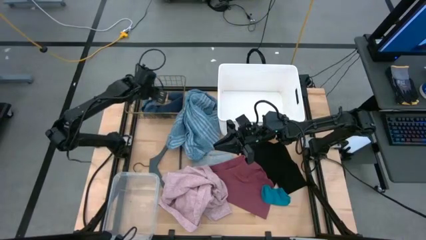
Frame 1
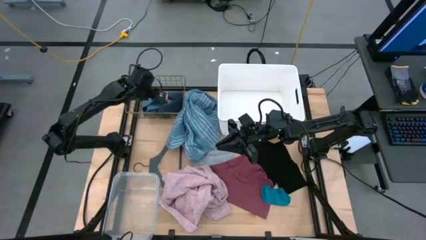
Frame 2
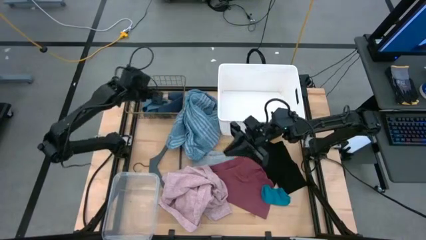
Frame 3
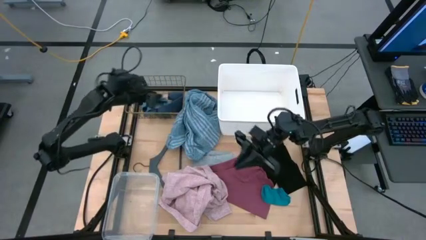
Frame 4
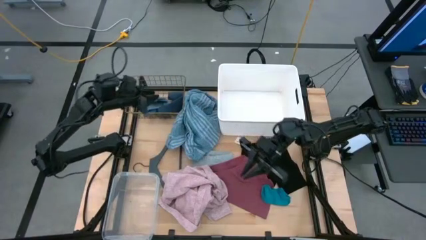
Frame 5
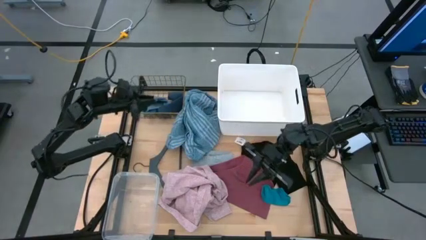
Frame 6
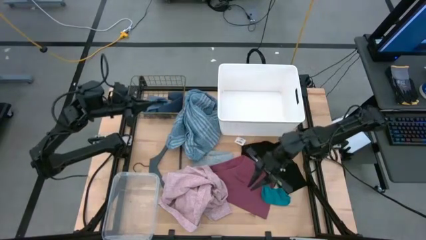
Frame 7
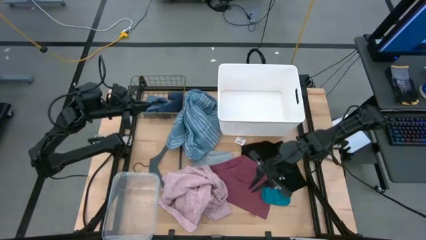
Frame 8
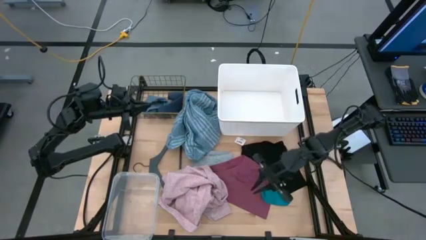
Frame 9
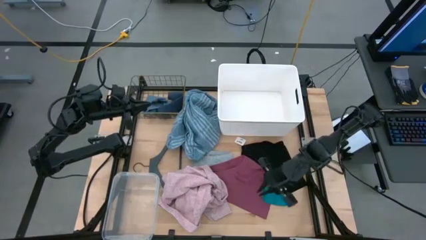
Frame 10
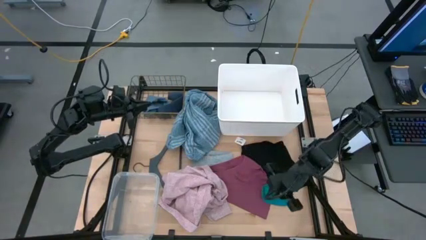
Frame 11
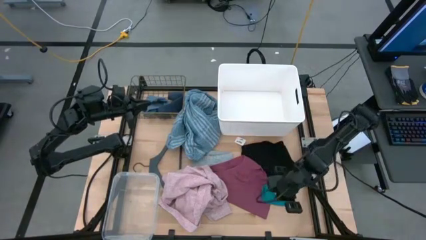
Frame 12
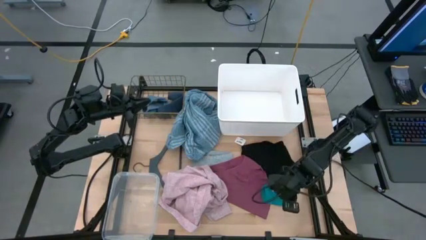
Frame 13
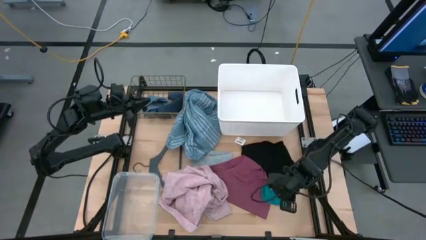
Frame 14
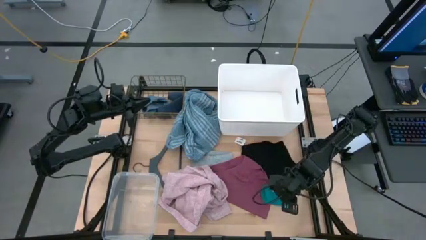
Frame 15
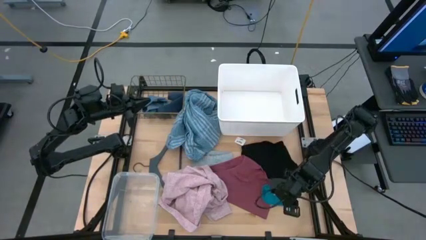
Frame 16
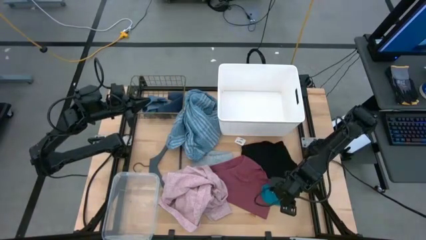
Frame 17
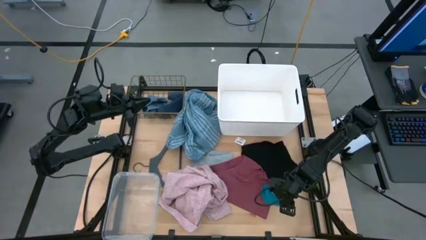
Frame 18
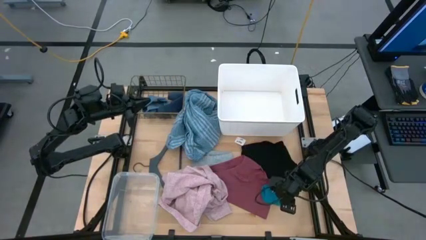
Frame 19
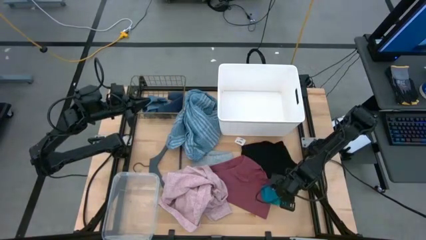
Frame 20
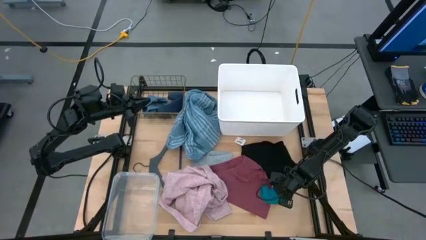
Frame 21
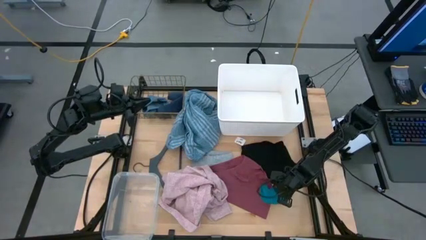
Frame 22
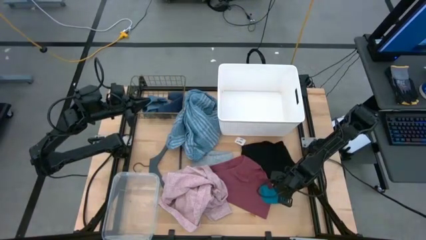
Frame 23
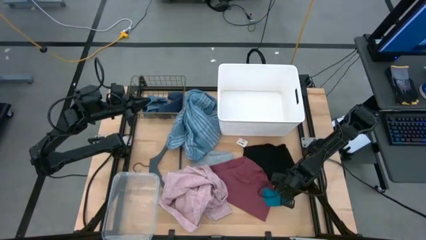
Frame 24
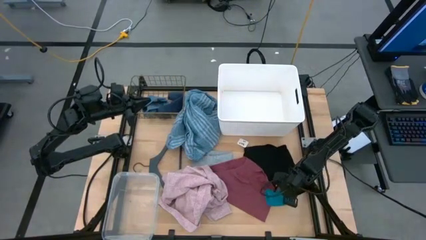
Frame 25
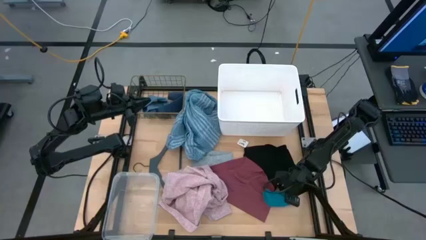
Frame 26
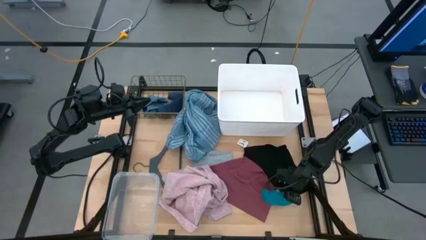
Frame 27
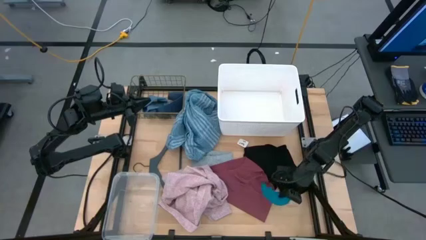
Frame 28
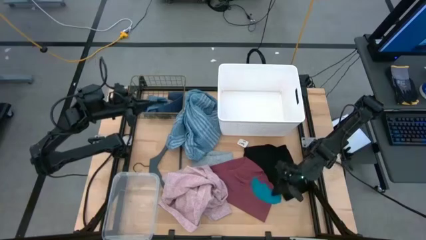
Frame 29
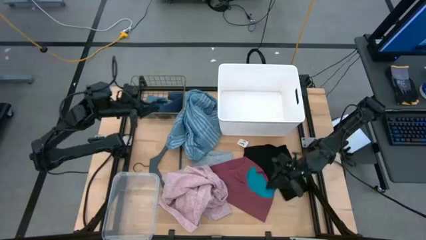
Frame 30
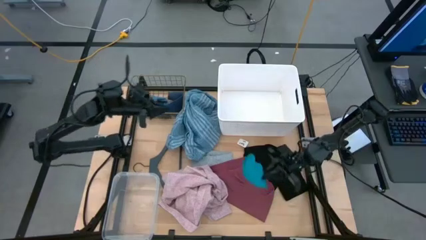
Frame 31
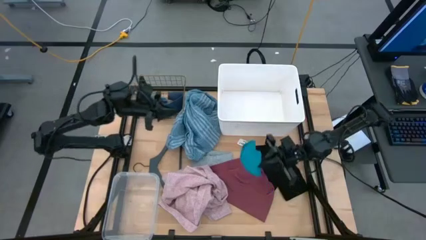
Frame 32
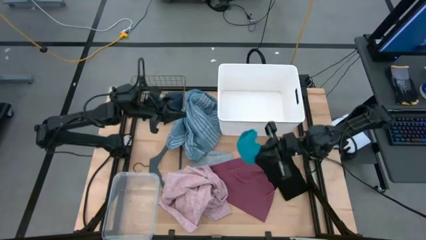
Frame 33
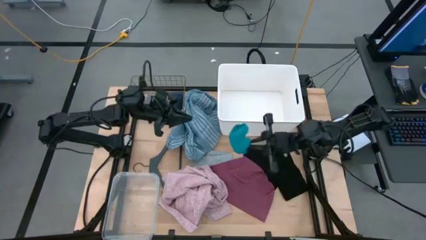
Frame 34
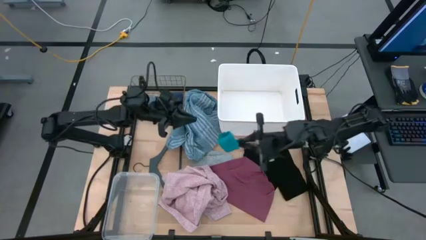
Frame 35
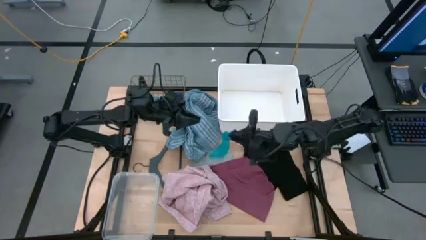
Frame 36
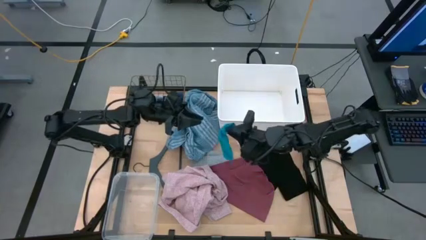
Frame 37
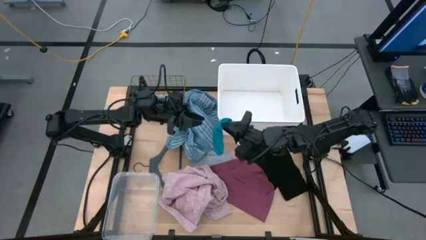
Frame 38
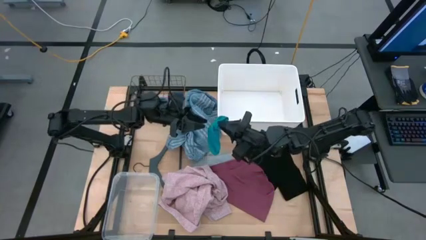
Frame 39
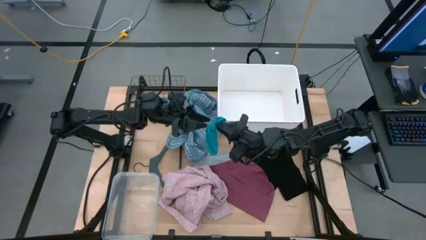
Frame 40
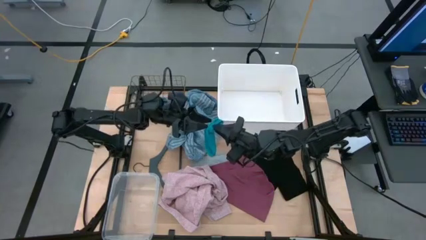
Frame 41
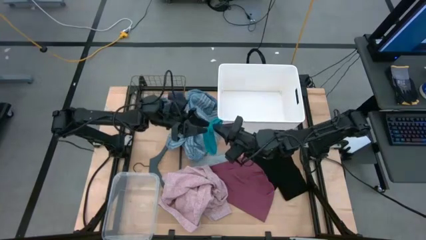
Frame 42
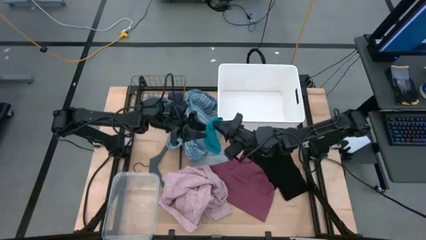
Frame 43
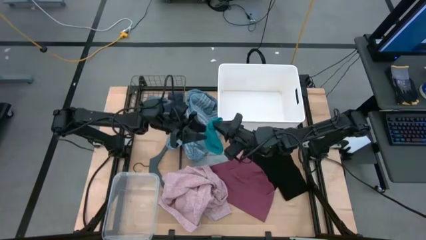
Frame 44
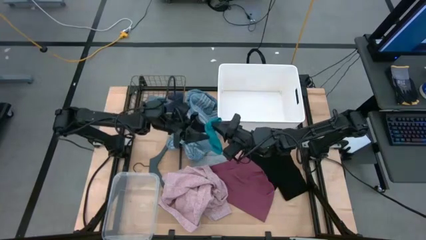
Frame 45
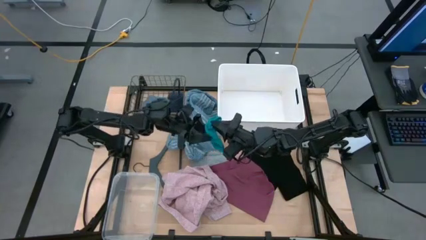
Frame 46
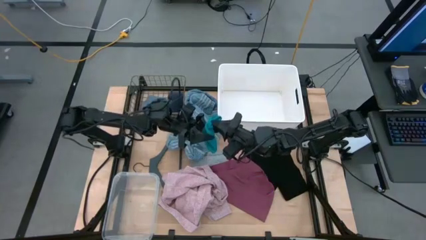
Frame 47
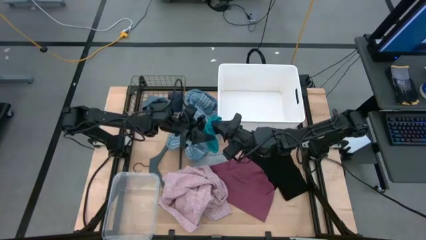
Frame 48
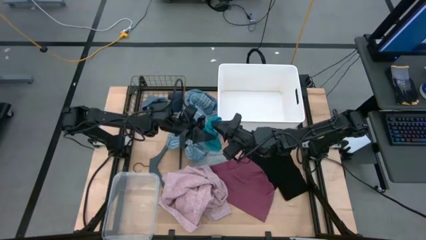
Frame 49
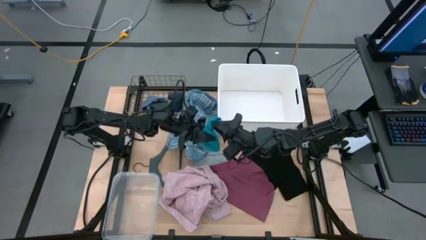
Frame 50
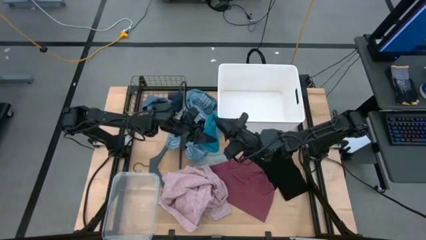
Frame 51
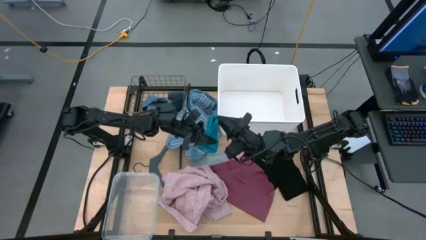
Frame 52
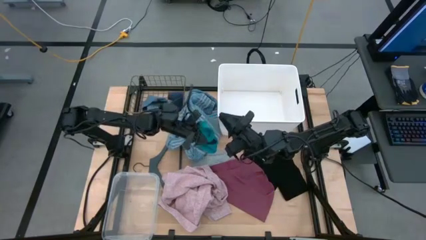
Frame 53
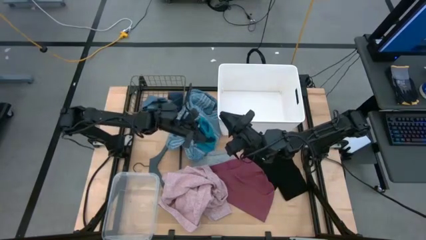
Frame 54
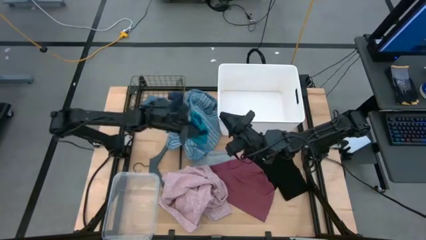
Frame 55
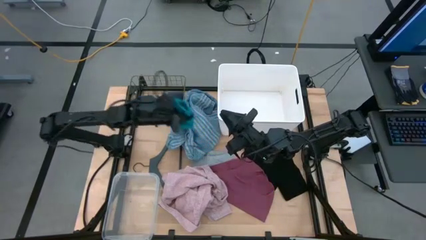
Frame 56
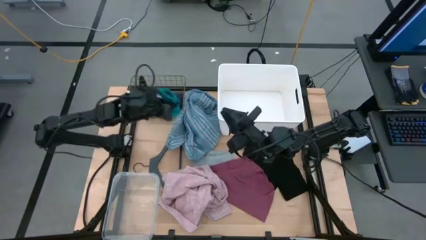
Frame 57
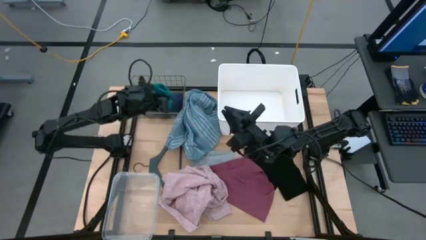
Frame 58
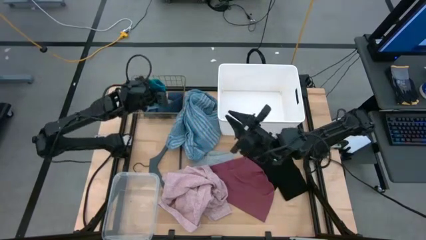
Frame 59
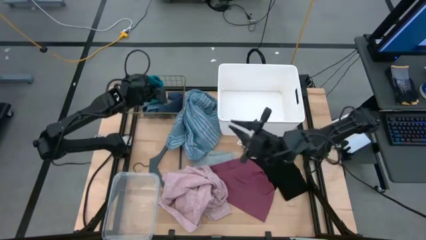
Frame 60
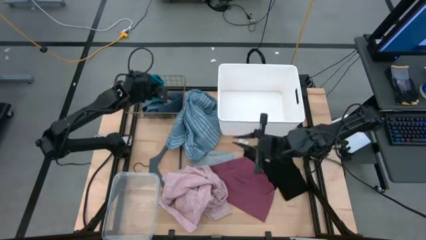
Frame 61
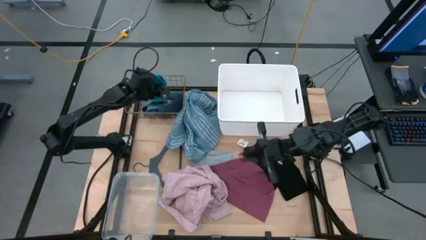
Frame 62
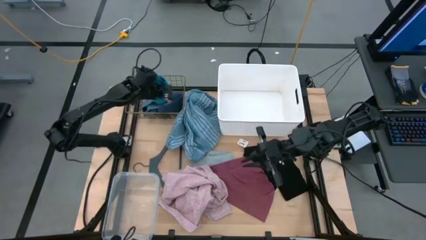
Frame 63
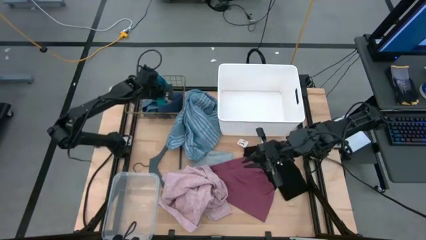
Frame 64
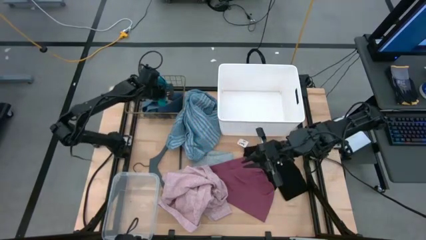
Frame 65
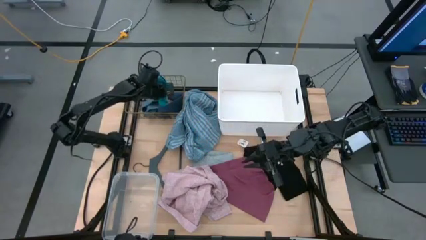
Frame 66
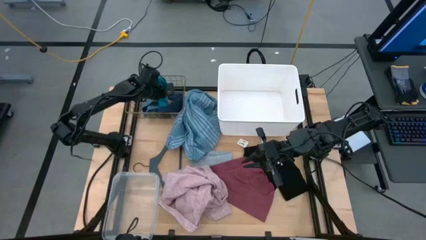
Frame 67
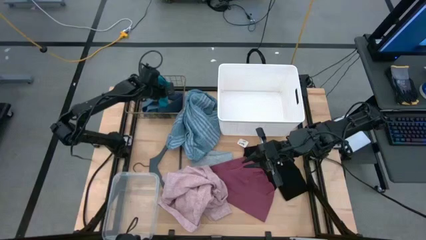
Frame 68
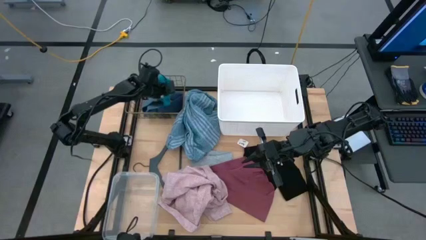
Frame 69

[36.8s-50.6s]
Task: Pick & Place Cloths
Put the light blue sock into the wire basket

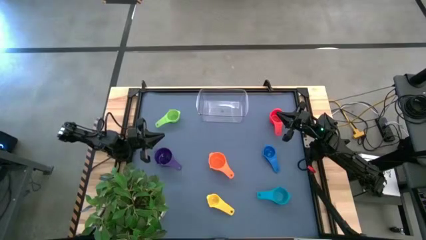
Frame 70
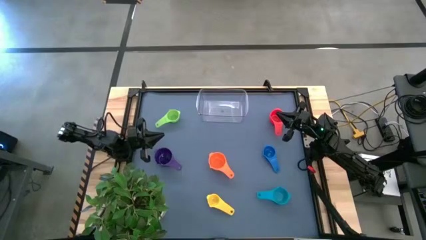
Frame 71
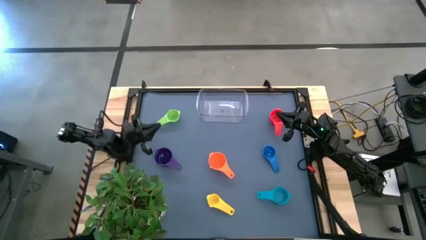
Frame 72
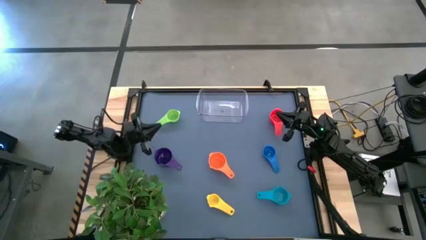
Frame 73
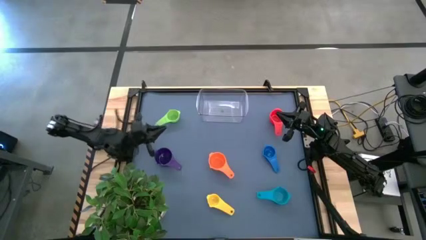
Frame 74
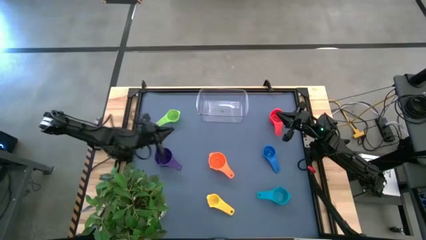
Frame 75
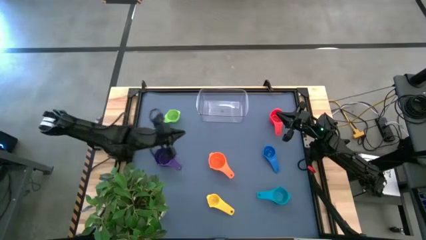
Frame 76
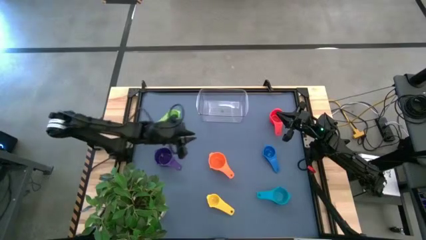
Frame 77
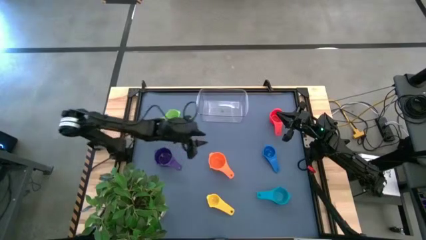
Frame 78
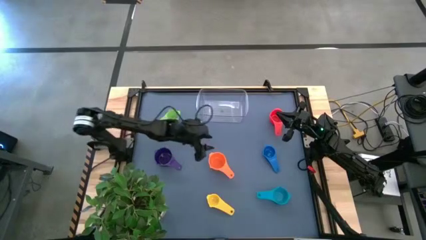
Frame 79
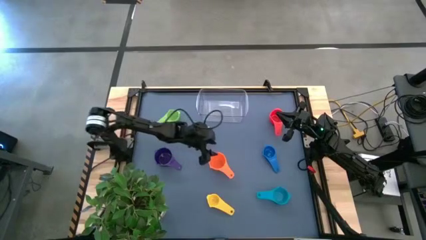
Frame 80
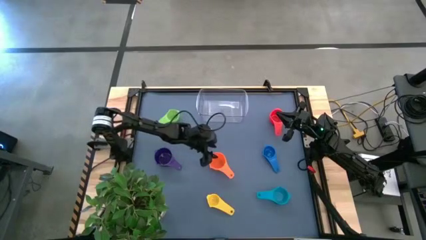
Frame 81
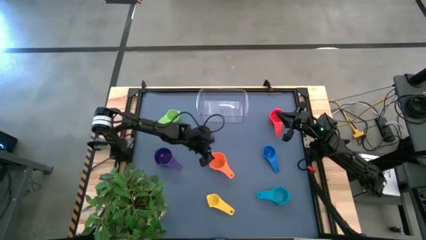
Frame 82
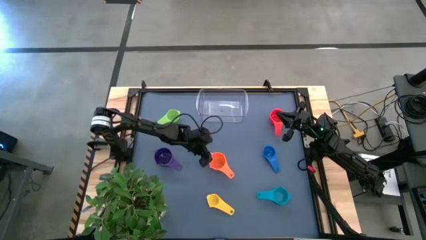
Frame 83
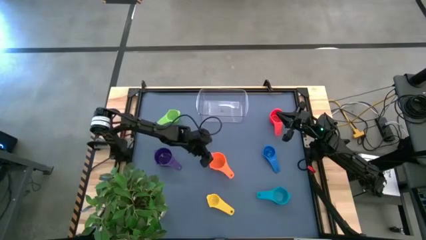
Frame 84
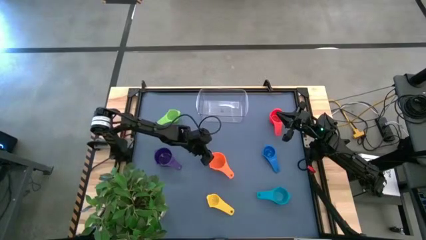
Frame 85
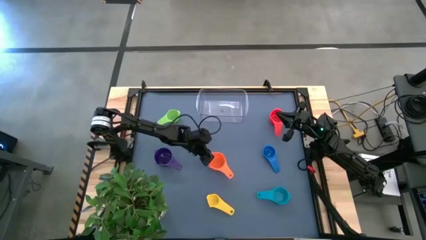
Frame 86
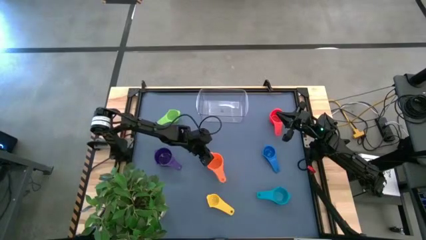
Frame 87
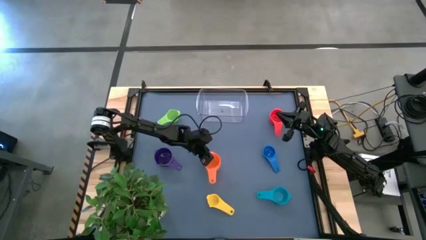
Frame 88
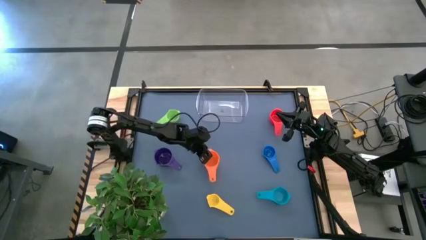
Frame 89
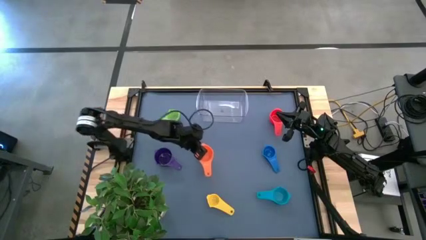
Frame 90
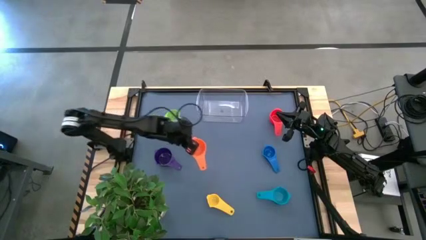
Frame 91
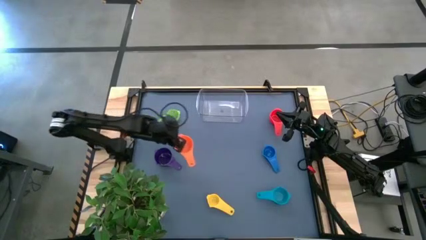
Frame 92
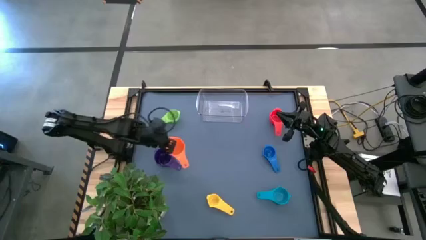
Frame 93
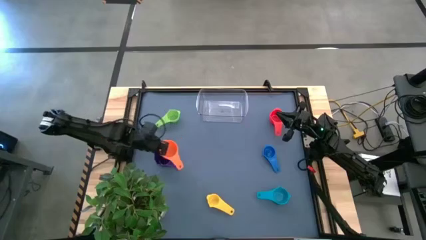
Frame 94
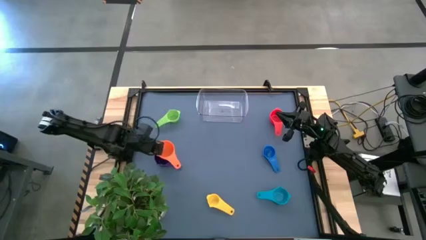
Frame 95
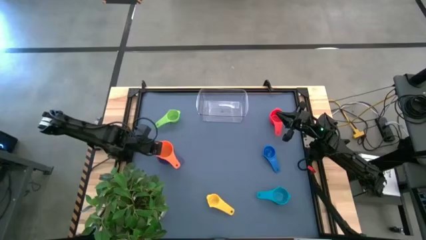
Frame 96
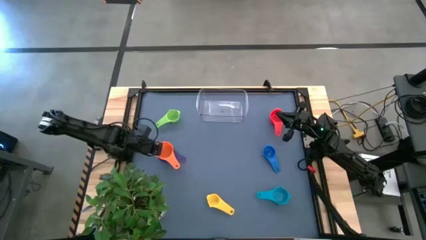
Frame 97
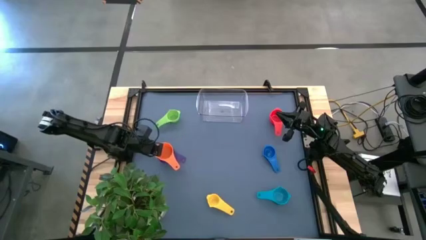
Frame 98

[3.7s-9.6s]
Task: Nest measuring cups in basket
Stack the orange measuring cup on top of the purple measuring cup
